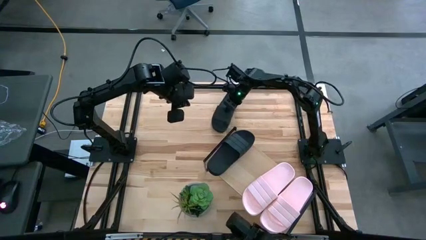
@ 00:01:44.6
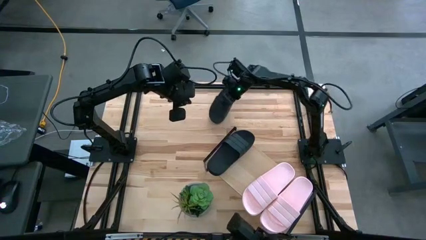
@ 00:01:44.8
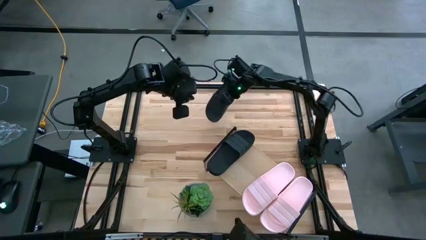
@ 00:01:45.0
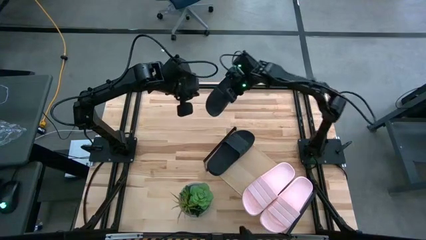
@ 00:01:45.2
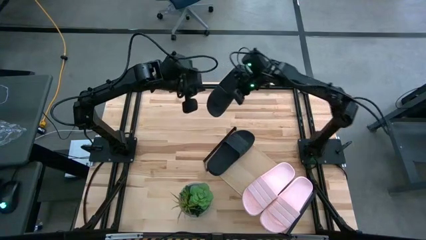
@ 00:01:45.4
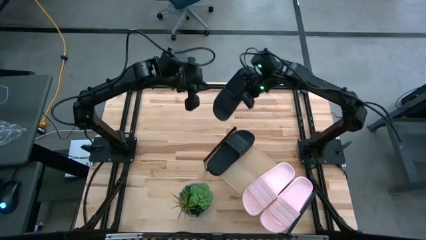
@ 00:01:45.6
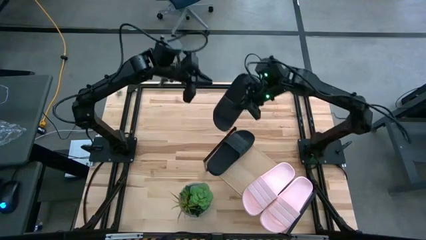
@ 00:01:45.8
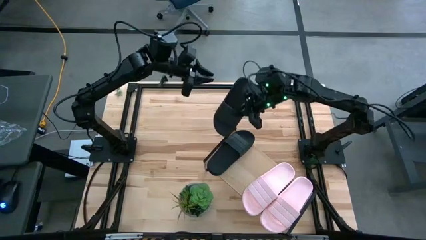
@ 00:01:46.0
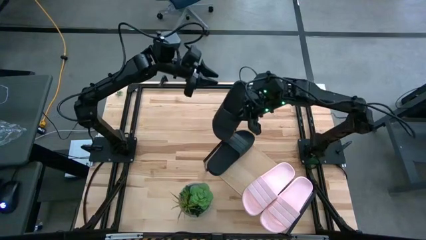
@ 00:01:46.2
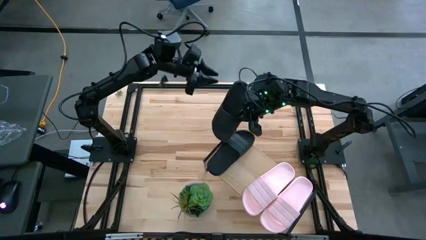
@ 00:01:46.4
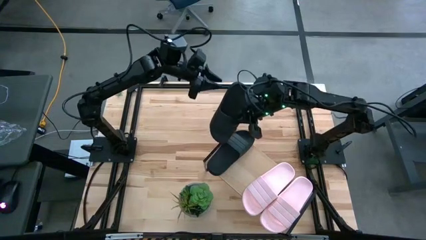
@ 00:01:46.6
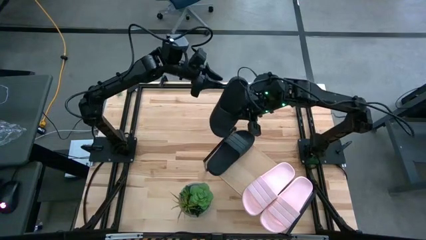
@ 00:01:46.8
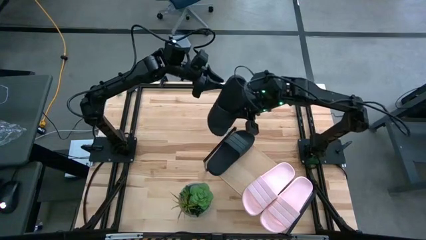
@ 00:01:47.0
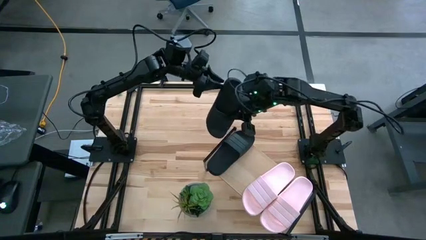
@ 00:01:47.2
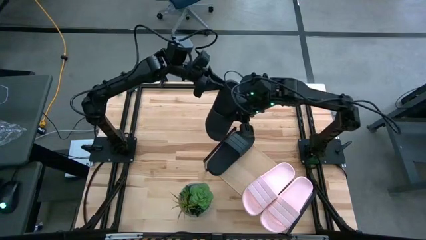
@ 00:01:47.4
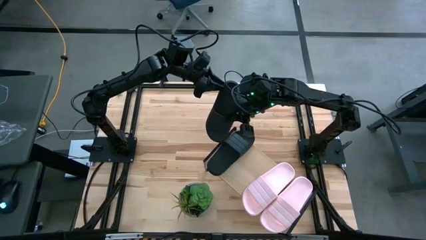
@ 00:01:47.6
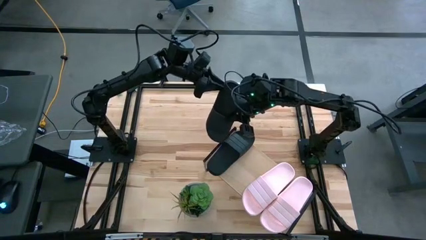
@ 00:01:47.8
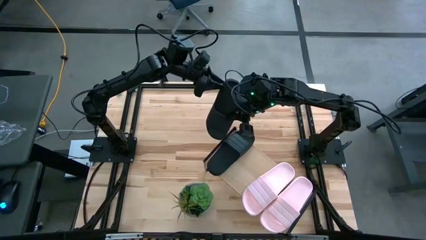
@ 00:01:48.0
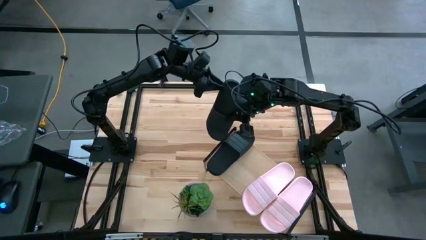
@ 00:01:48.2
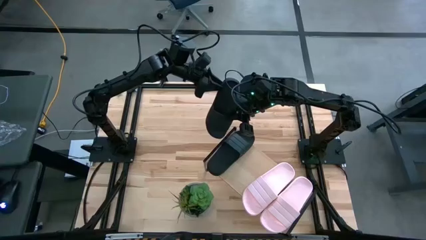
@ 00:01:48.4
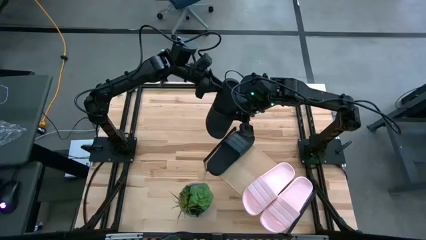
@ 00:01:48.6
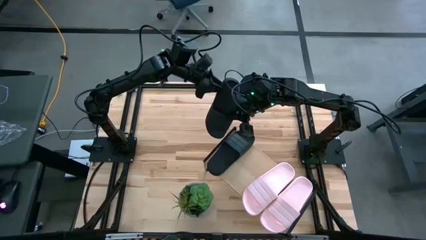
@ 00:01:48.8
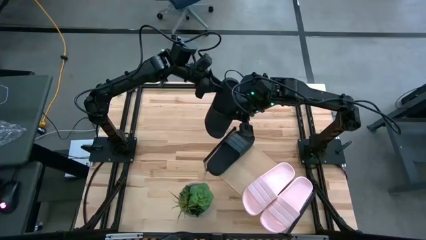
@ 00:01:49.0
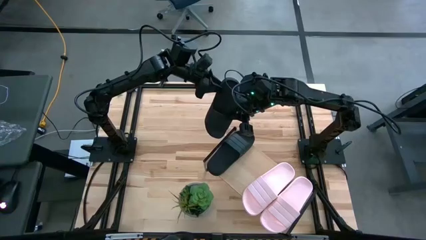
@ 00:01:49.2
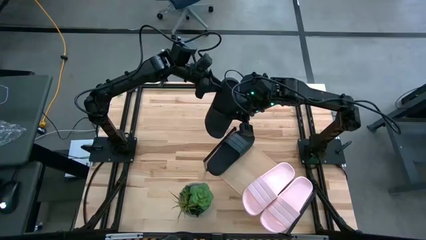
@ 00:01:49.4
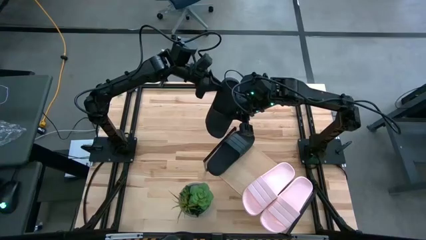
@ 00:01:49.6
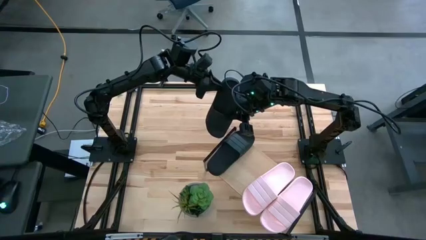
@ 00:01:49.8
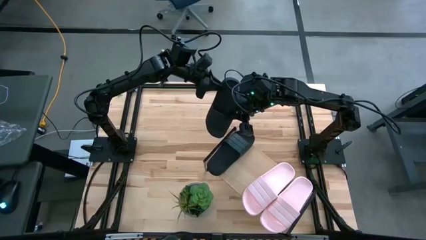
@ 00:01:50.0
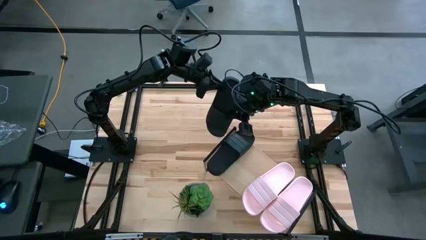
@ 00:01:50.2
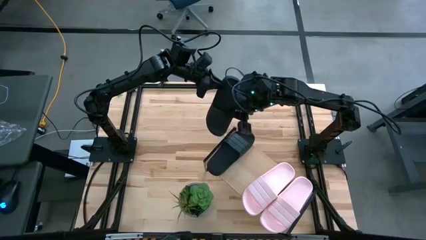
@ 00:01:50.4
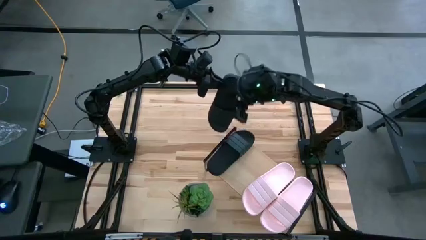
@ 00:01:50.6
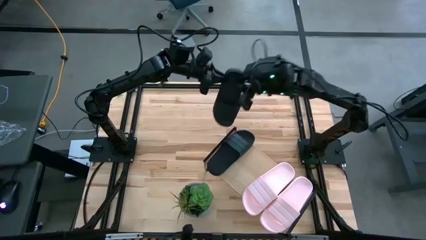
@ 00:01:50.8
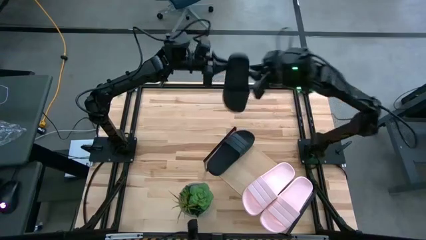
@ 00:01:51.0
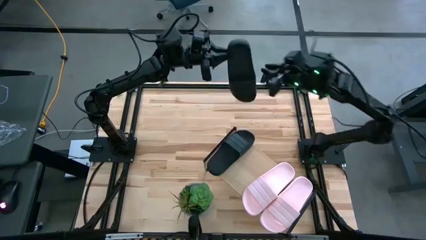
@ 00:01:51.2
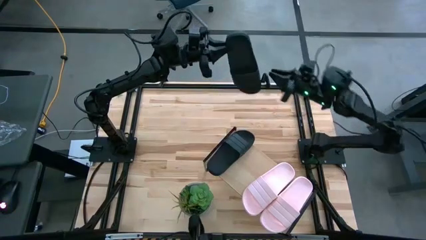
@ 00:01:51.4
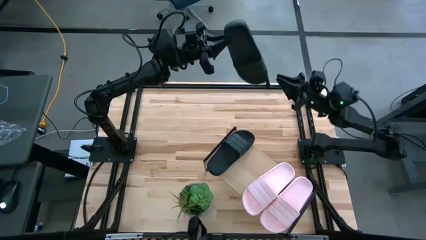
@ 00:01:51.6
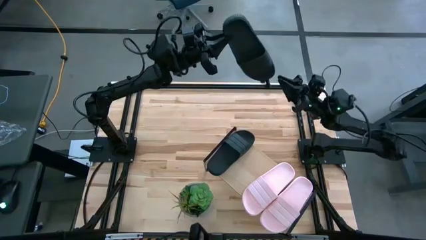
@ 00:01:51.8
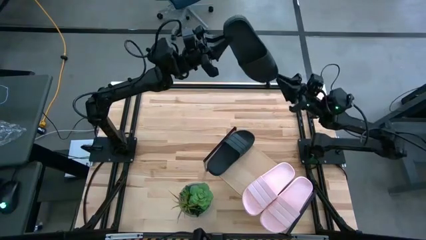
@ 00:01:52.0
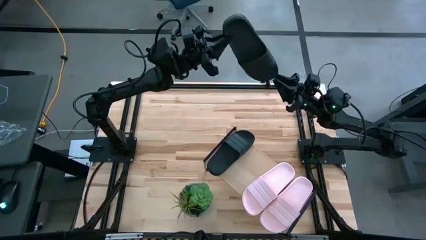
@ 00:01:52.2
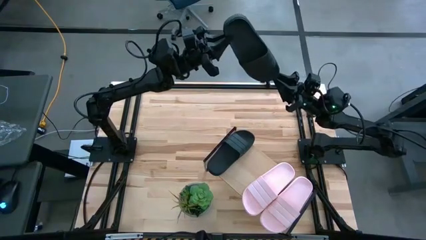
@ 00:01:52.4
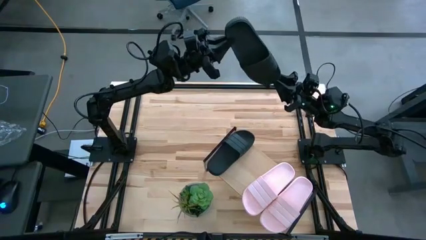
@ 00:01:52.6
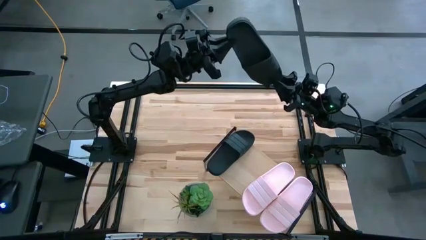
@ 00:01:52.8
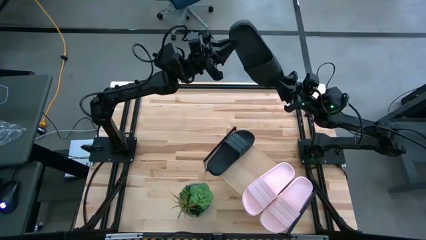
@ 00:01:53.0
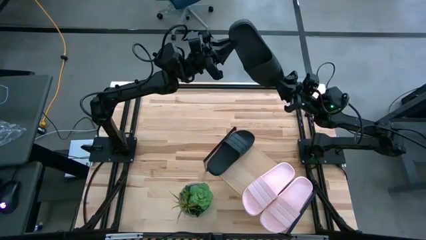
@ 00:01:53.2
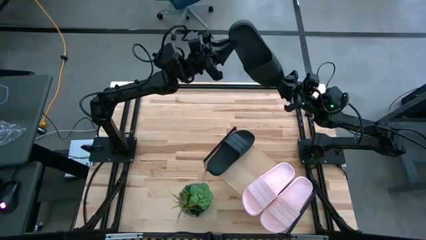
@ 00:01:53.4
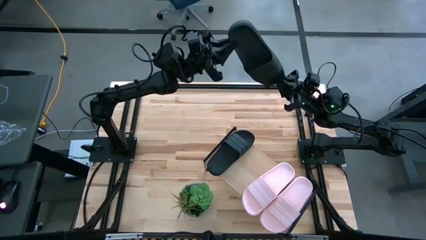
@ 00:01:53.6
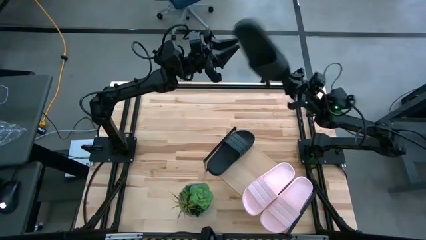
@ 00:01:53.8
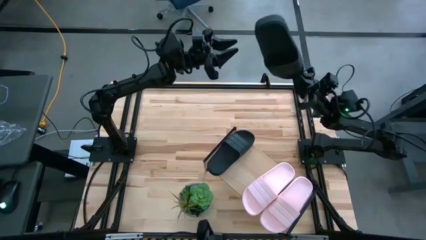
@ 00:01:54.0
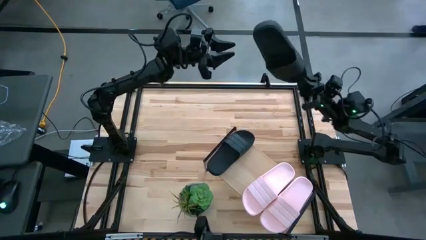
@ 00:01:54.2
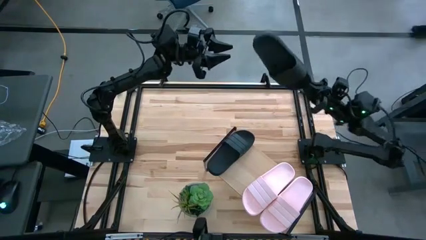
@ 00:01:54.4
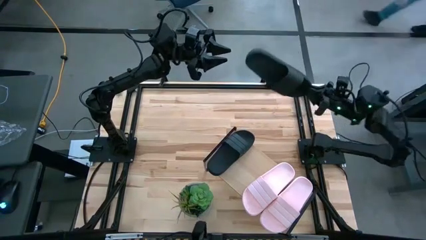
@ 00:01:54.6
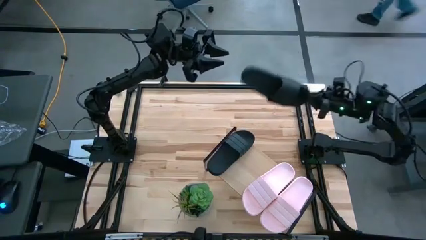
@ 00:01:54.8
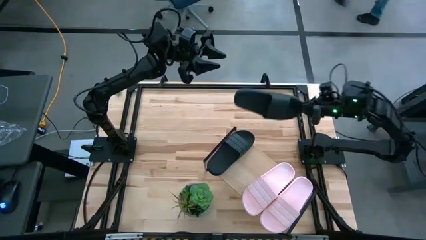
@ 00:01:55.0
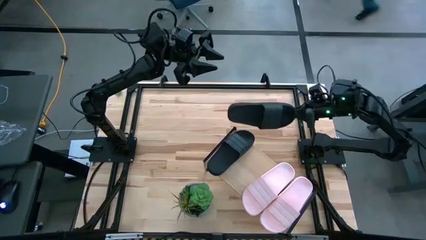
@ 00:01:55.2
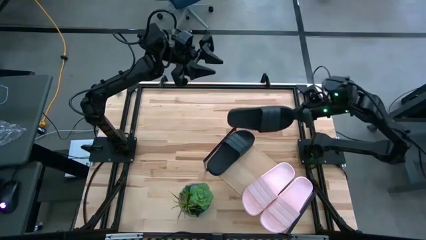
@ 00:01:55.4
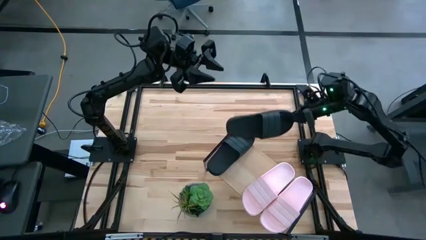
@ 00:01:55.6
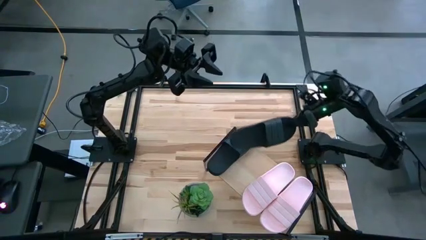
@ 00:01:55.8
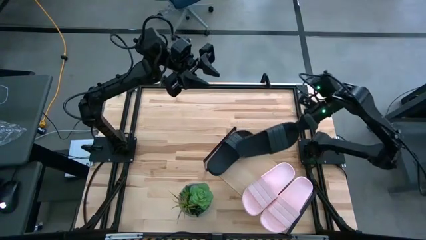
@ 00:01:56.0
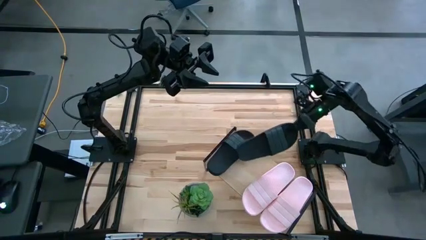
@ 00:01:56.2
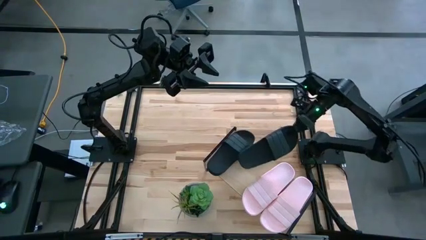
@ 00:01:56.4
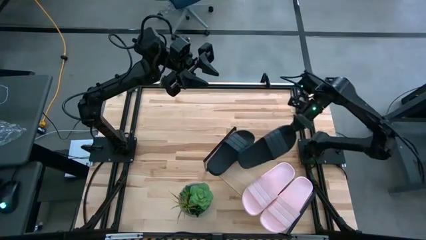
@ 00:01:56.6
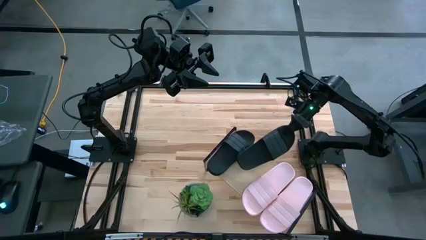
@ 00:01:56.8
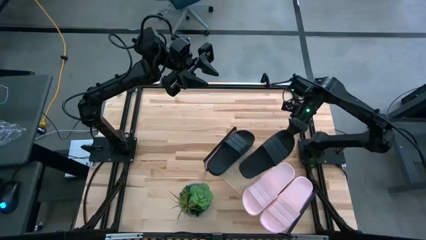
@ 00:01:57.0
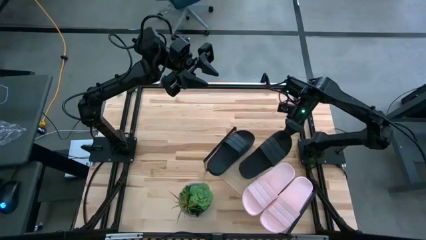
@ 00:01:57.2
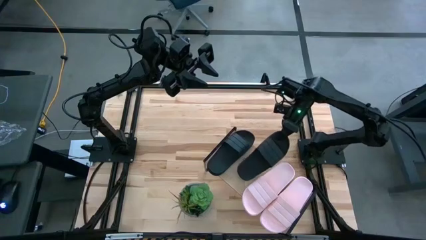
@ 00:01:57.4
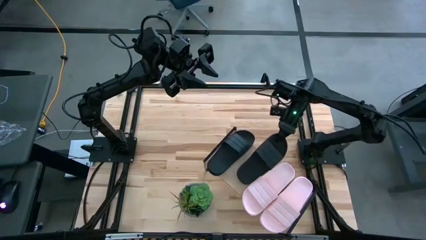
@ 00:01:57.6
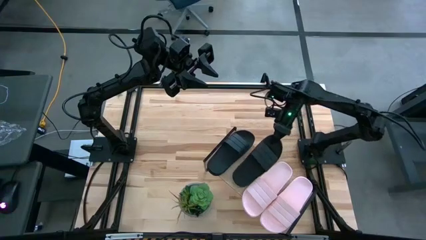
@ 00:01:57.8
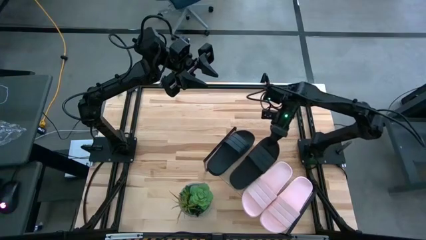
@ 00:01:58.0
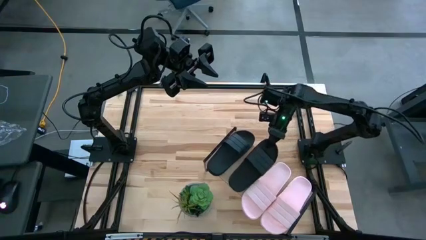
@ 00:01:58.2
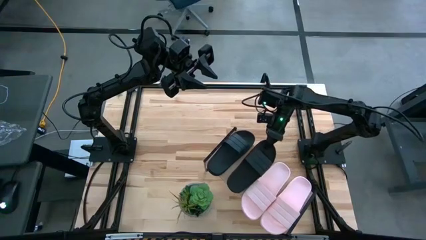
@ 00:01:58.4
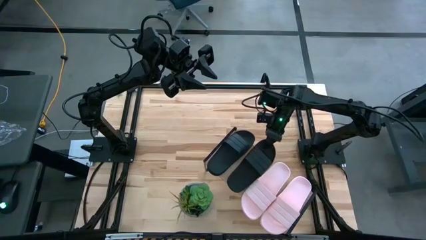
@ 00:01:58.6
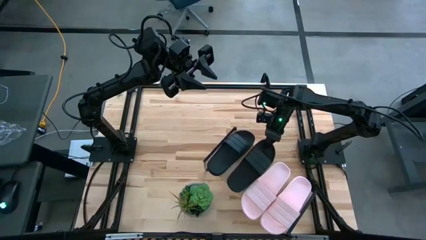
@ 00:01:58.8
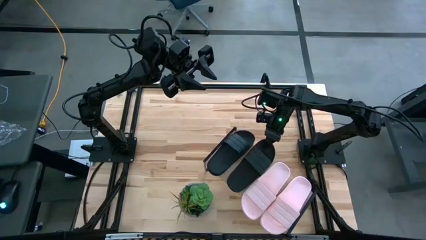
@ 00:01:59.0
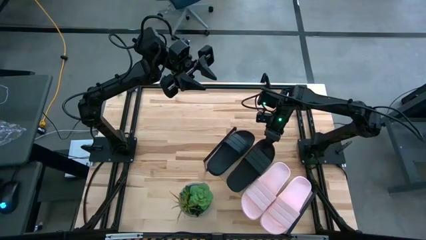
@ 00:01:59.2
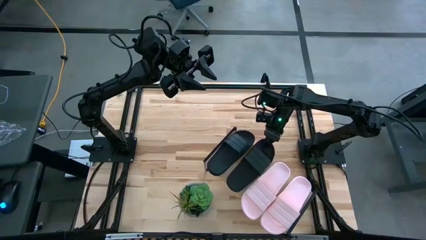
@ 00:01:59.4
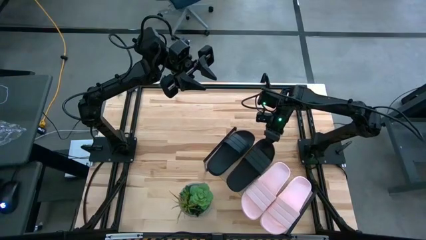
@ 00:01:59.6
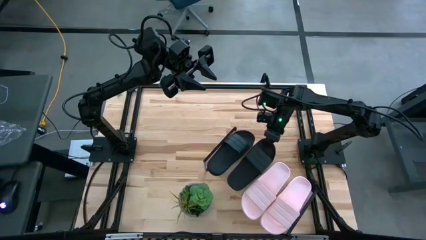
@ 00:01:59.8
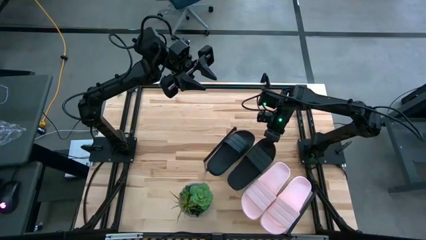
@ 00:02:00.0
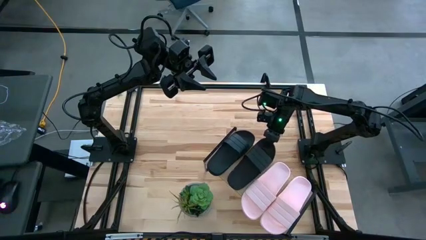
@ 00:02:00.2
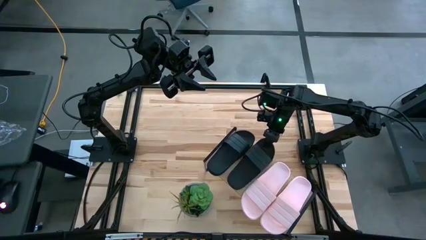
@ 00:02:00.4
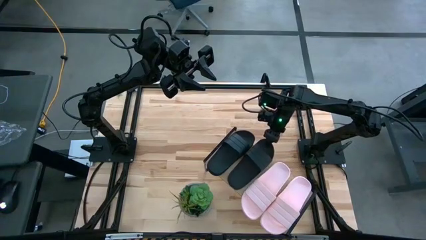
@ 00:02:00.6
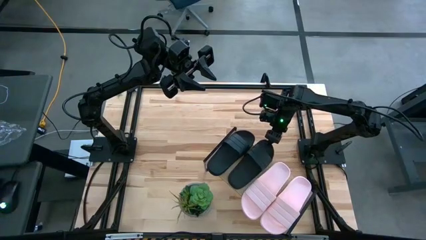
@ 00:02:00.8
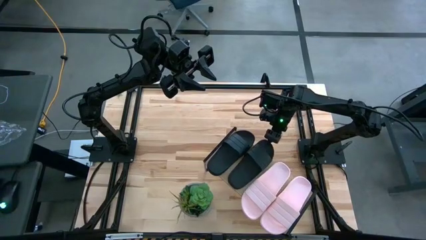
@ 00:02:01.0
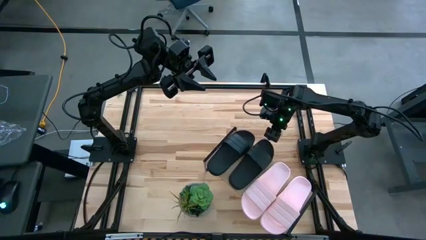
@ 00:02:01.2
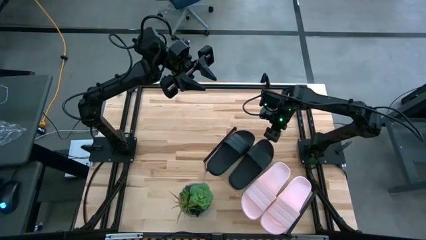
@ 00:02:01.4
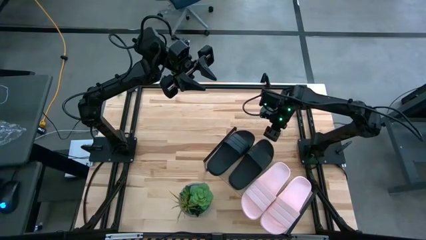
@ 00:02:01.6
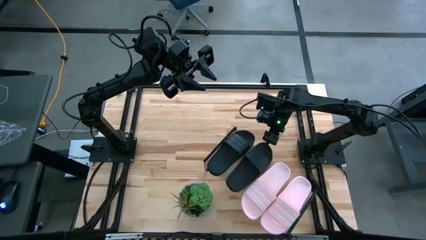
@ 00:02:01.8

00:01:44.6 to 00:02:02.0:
Task: Pick and place slides into the shelf
Put the black slides on the shelf
